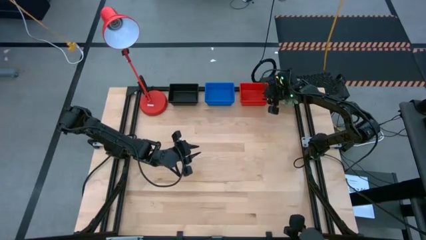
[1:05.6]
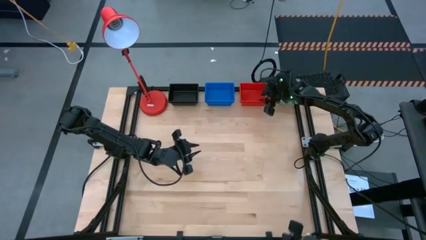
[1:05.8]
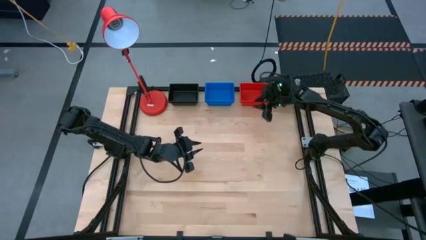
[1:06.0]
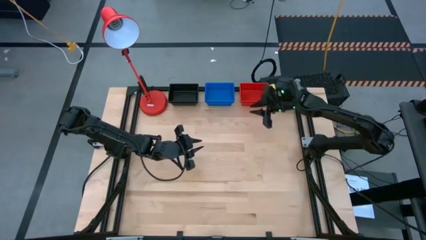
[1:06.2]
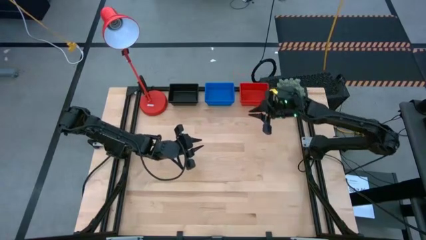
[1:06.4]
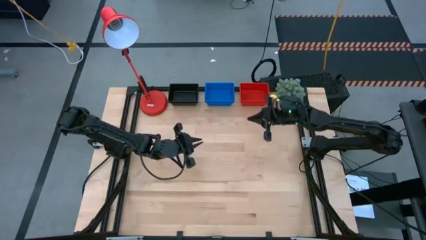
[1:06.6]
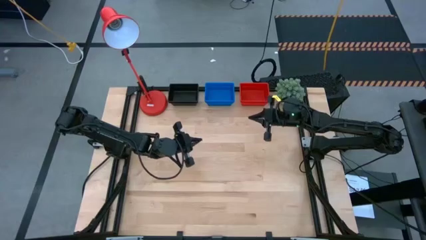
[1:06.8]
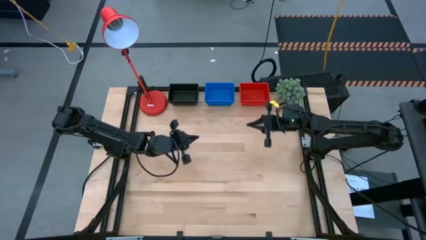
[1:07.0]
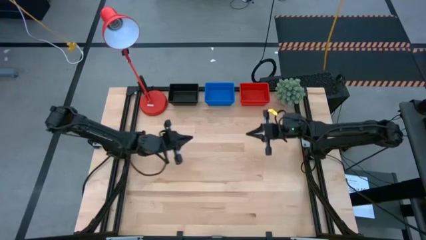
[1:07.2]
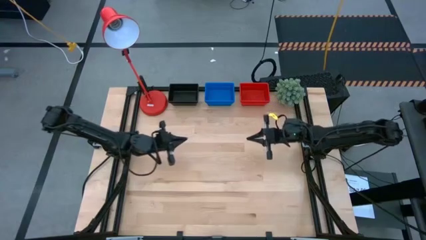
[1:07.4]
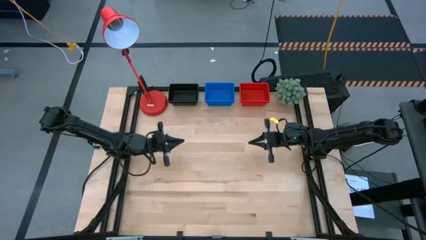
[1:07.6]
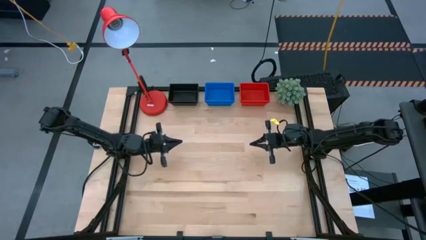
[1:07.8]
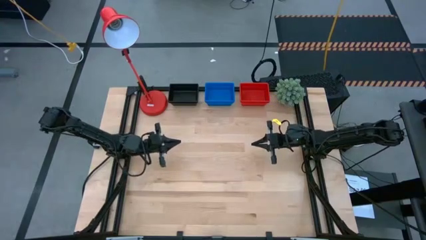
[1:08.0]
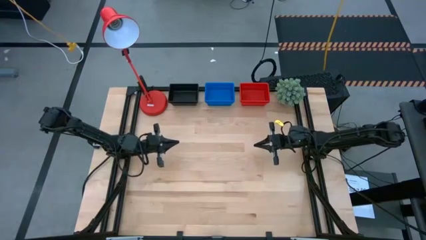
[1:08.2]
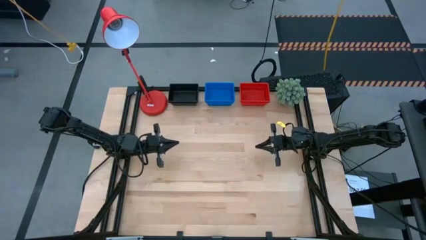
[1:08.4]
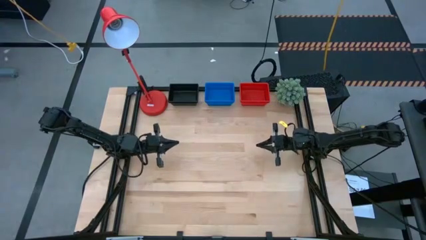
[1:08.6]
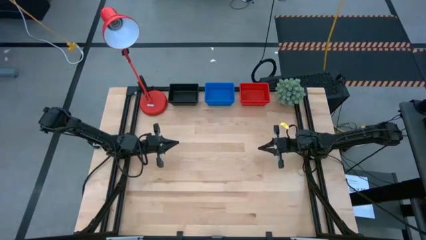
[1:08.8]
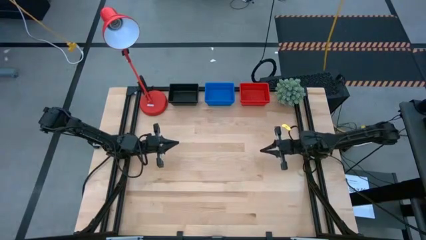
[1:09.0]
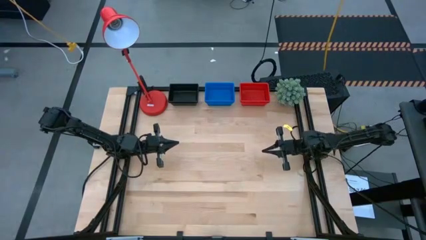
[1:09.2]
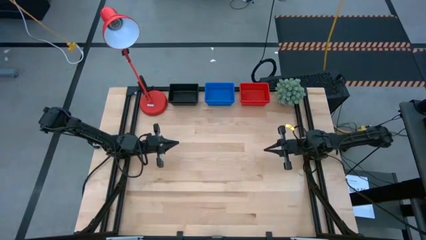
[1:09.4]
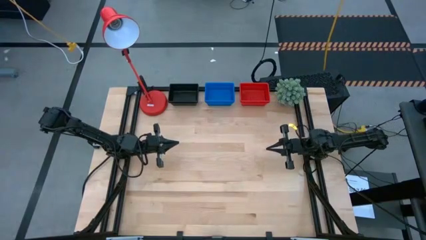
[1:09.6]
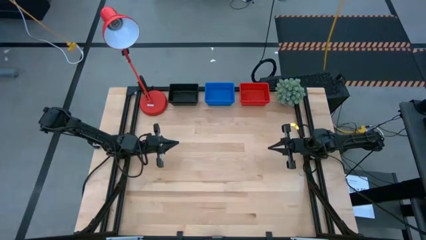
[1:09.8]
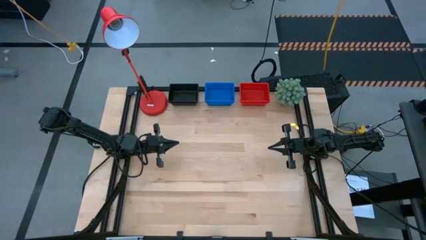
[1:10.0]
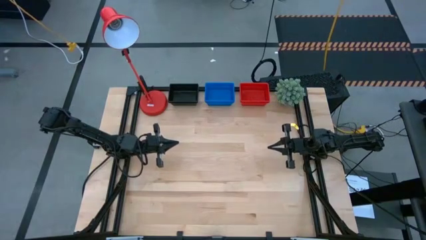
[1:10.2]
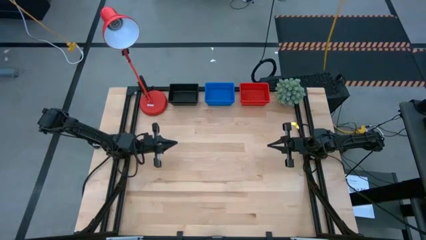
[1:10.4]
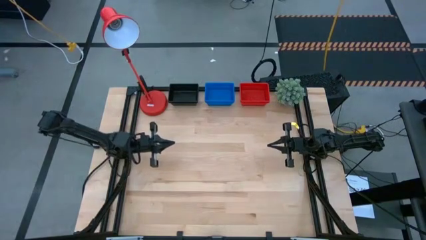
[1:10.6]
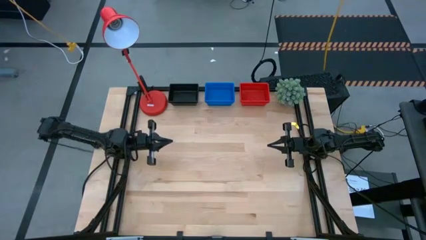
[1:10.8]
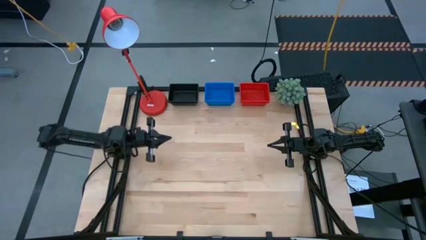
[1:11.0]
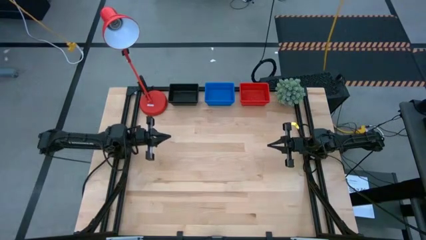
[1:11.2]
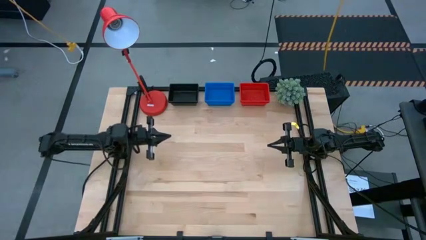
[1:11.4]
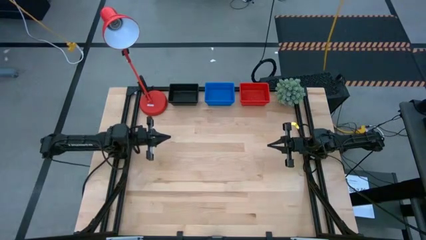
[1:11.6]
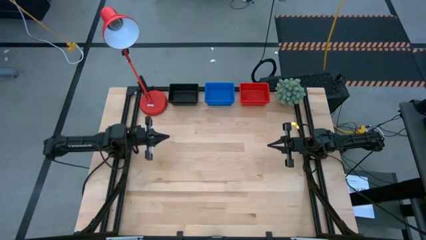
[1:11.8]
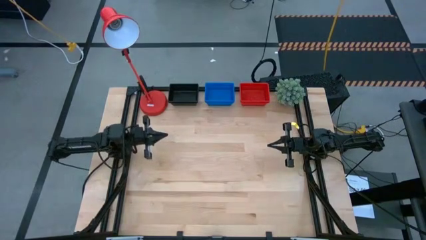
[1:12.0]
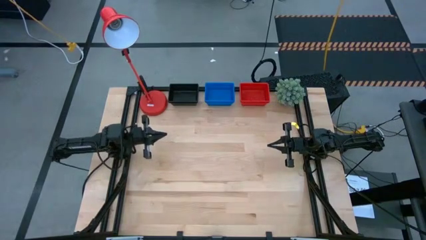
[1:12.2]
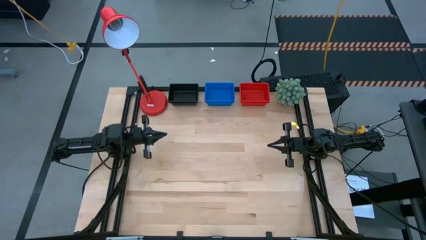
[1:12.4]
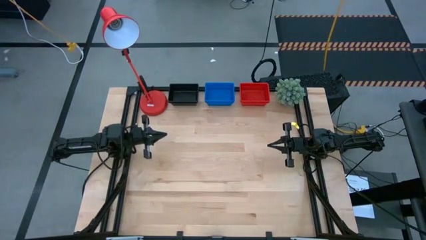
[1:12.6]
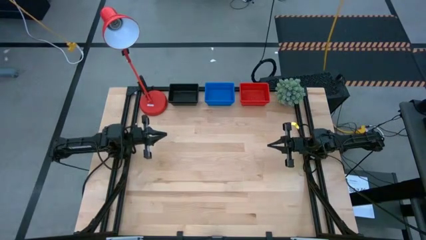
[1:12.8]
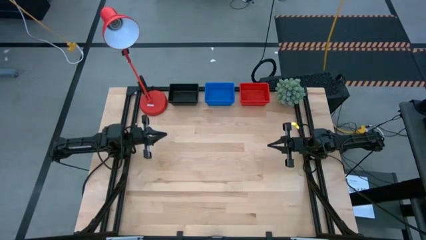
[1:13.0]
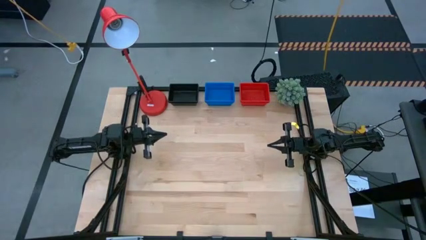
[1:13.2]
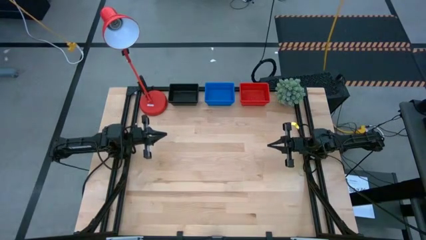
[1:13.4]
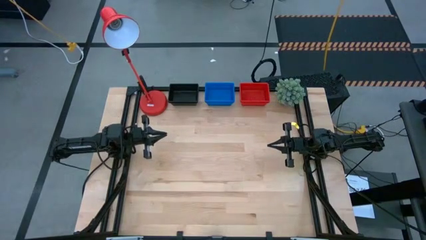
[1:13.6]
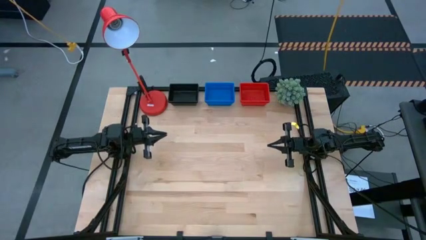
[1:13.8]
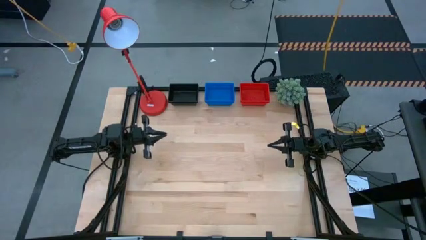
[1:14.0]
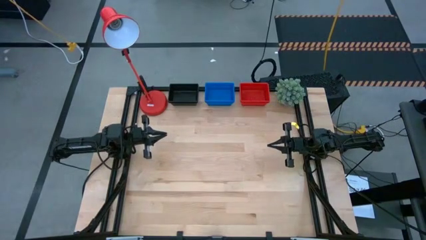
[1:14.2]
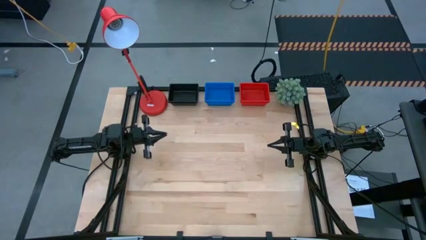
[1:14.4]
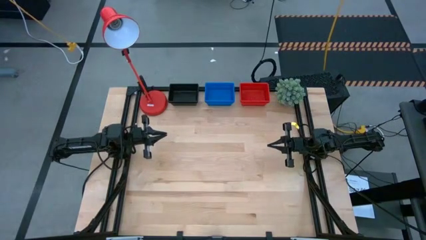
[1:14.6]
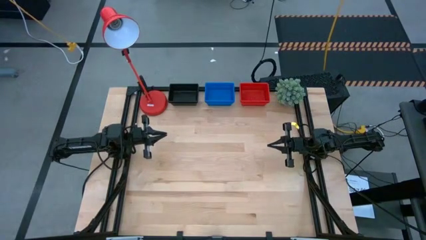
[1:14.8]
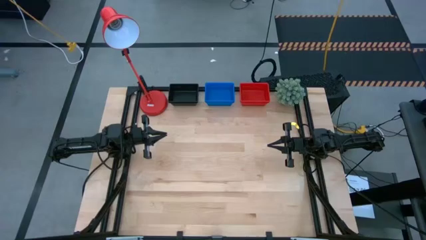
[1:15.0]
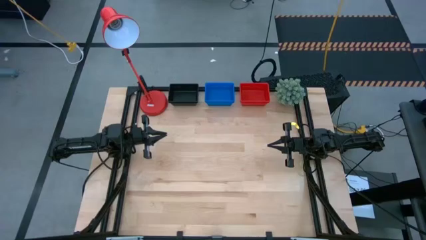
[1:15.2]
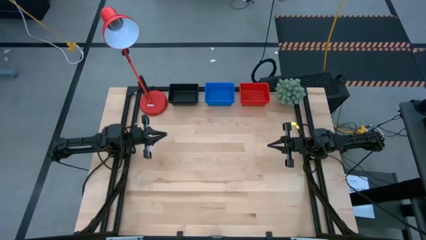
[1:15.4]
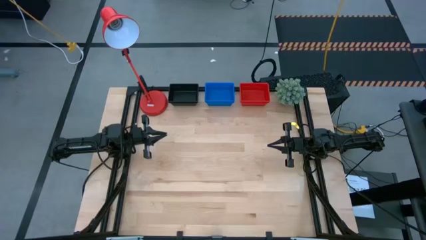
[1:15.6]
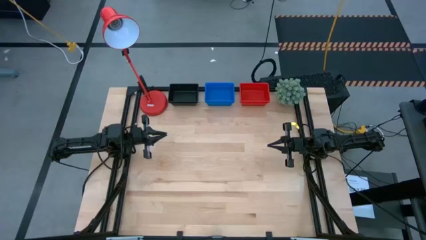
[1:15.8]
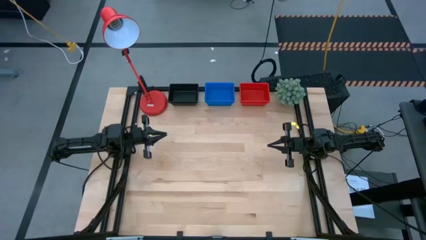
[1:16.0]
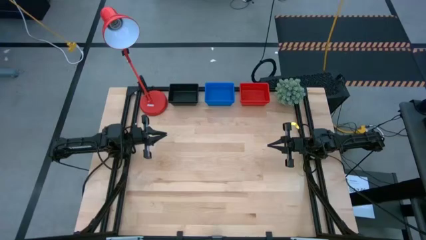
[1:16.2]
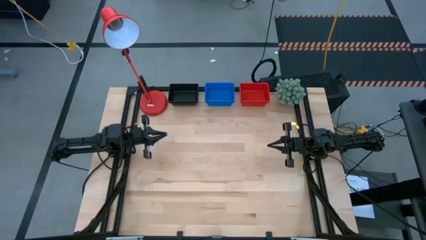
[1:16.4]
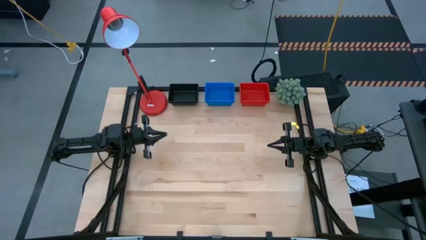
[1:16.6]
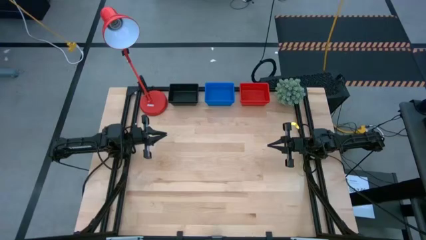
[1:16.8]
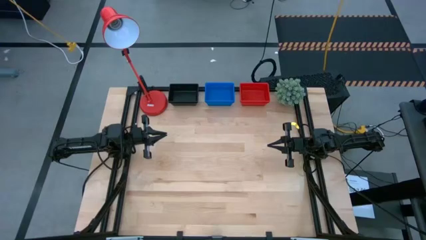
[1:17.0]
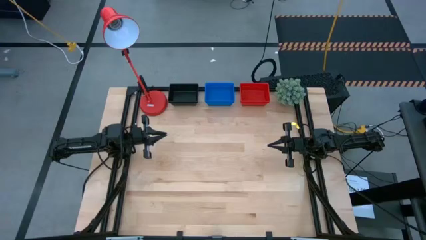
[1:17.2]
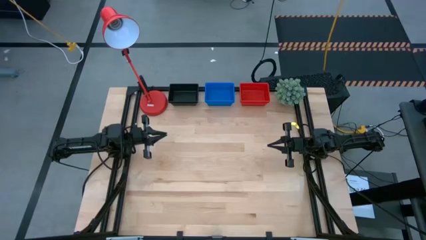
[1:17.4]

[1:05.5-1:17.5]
Return to Home Position
